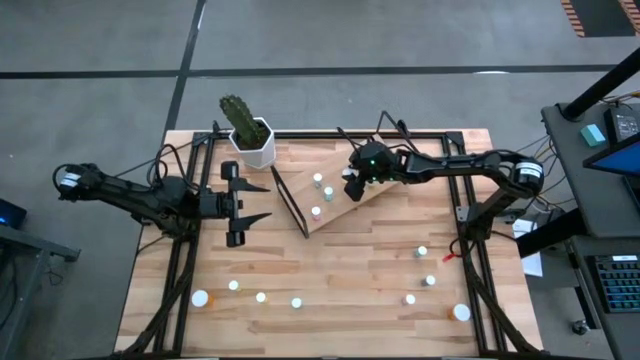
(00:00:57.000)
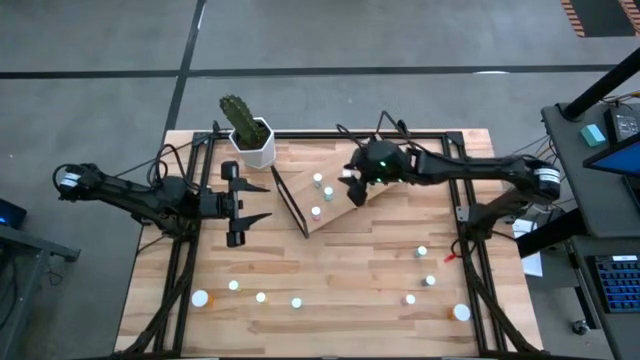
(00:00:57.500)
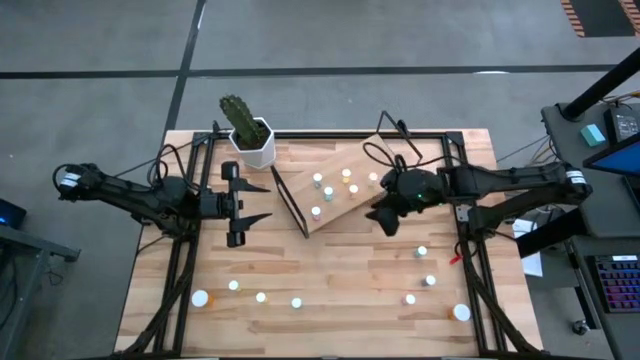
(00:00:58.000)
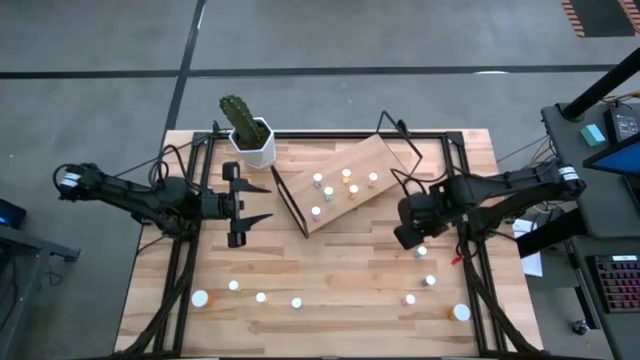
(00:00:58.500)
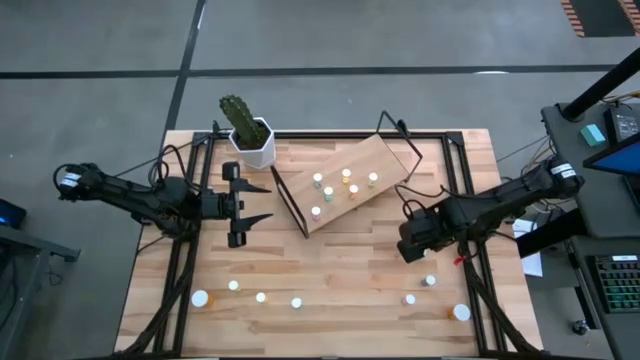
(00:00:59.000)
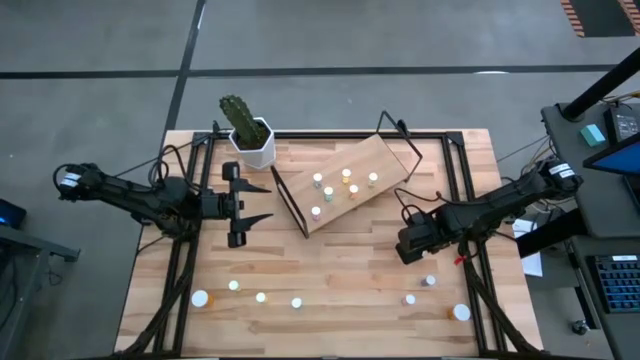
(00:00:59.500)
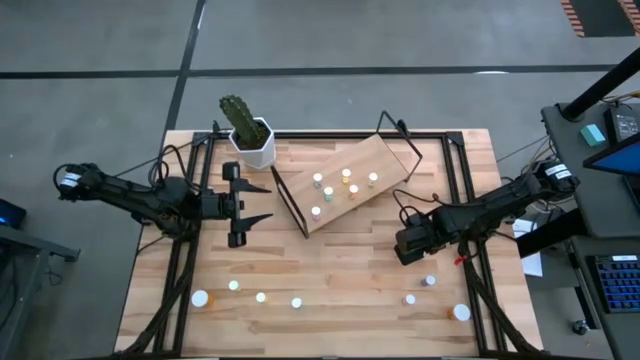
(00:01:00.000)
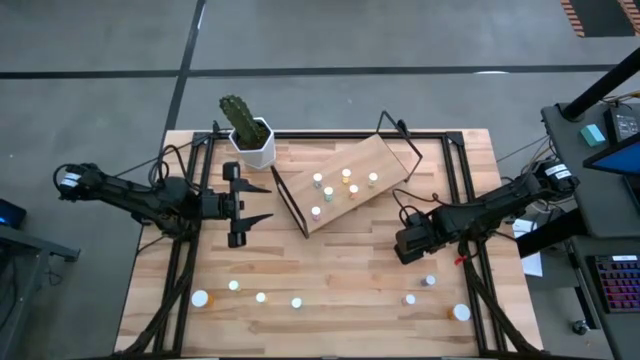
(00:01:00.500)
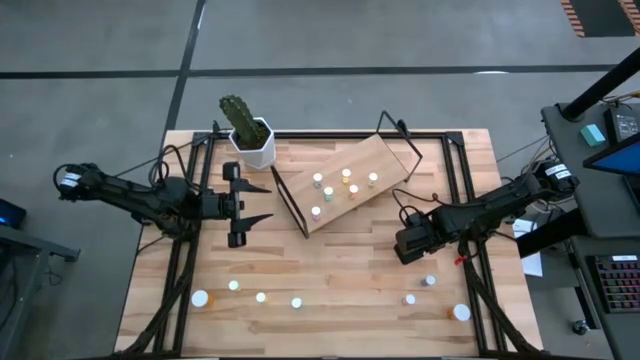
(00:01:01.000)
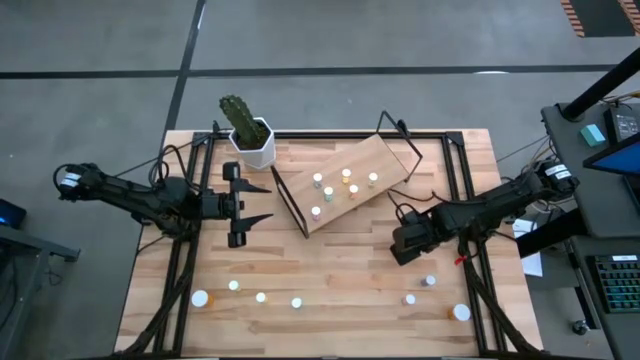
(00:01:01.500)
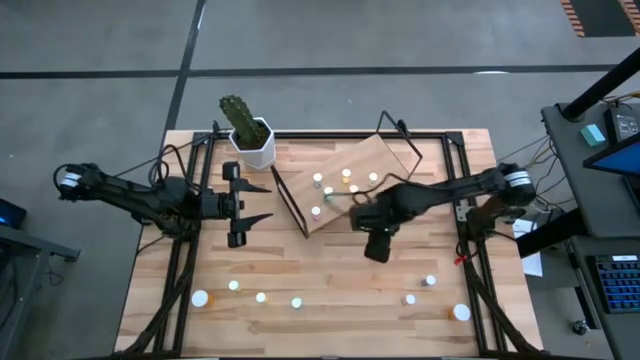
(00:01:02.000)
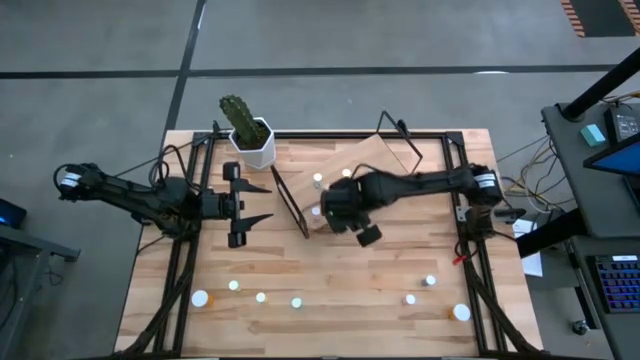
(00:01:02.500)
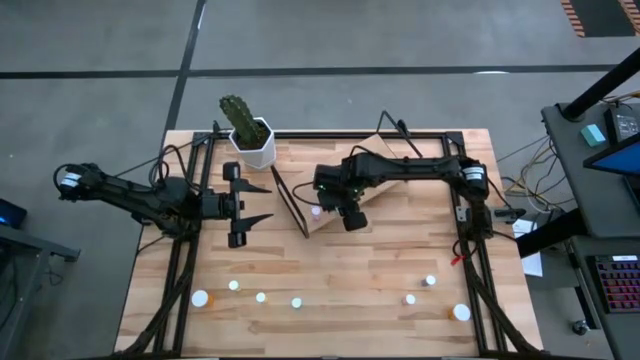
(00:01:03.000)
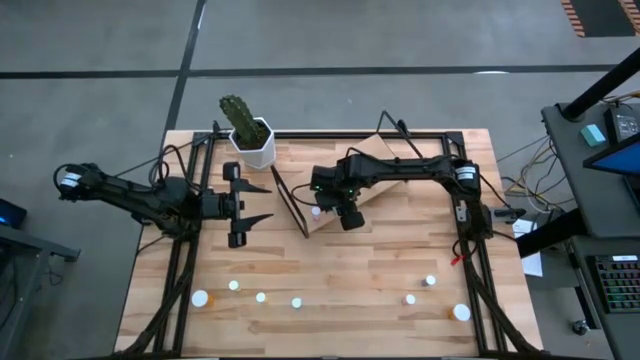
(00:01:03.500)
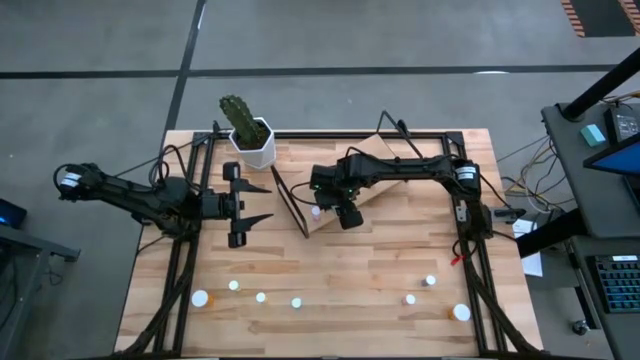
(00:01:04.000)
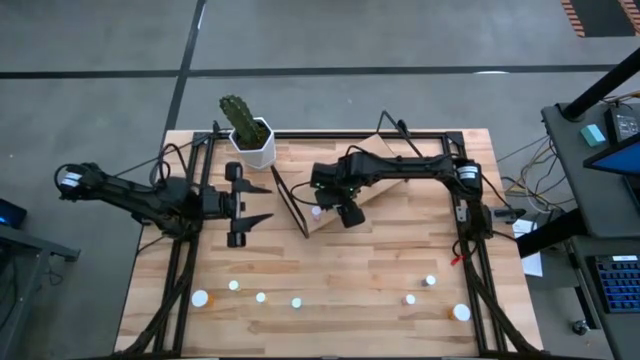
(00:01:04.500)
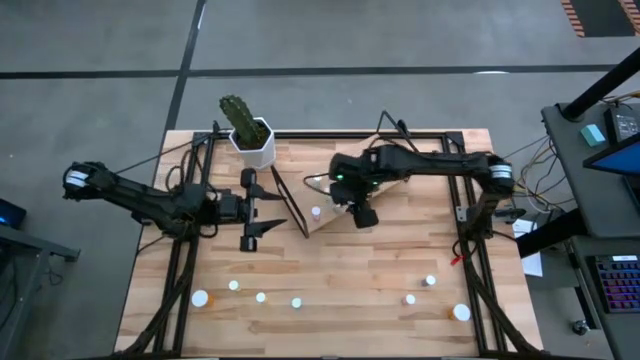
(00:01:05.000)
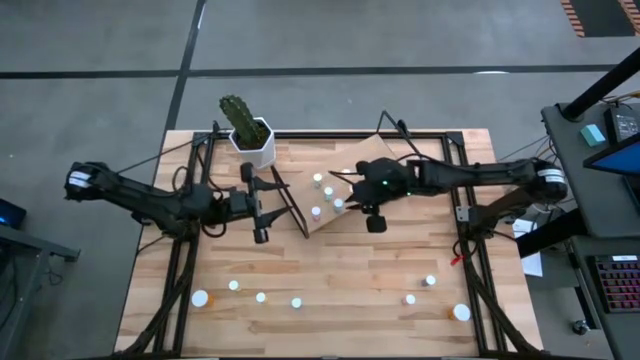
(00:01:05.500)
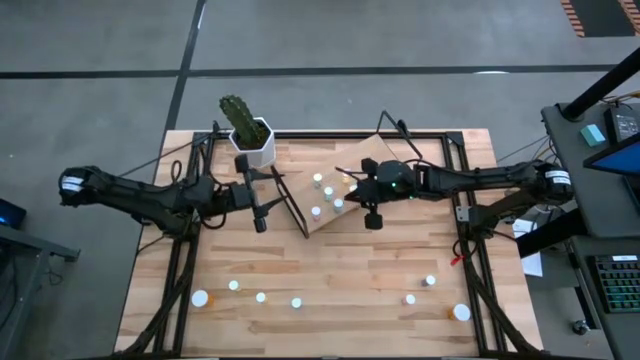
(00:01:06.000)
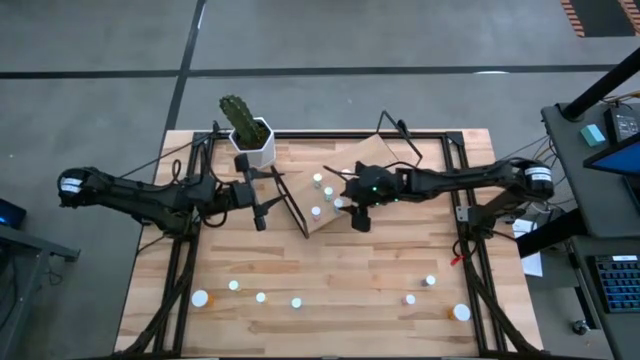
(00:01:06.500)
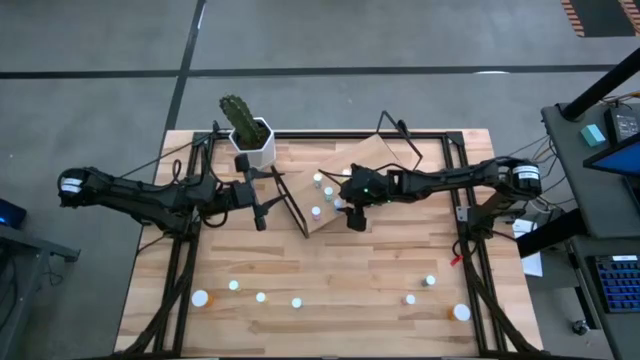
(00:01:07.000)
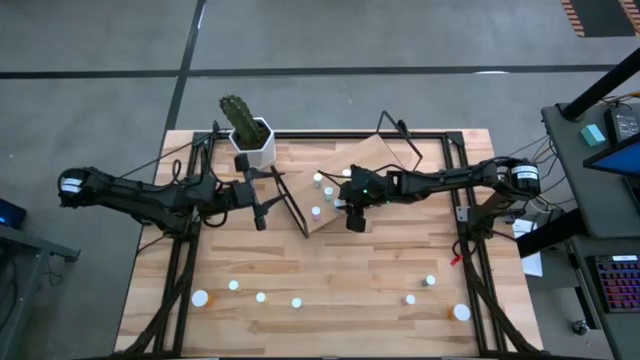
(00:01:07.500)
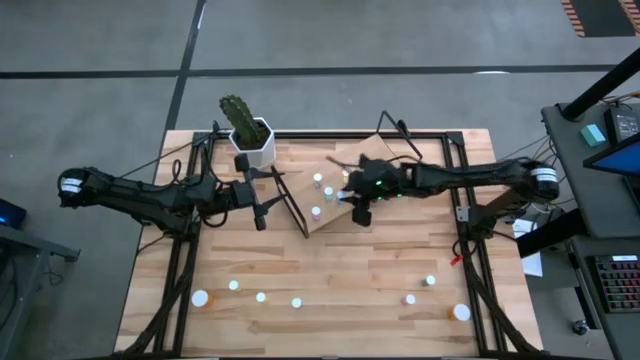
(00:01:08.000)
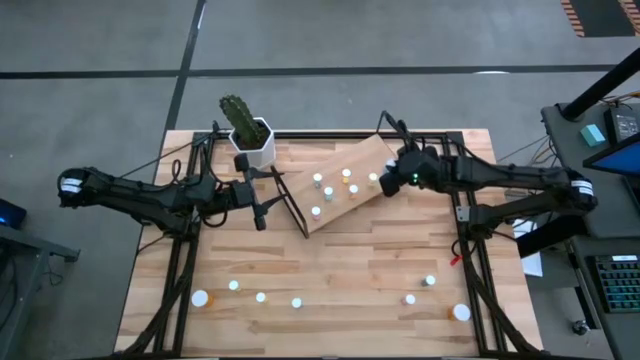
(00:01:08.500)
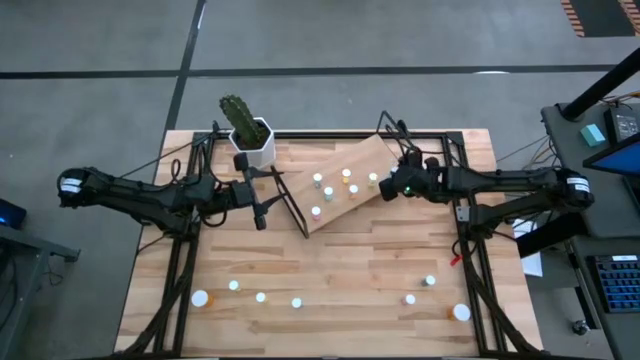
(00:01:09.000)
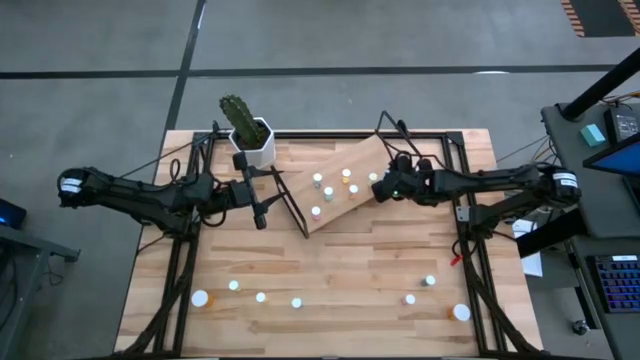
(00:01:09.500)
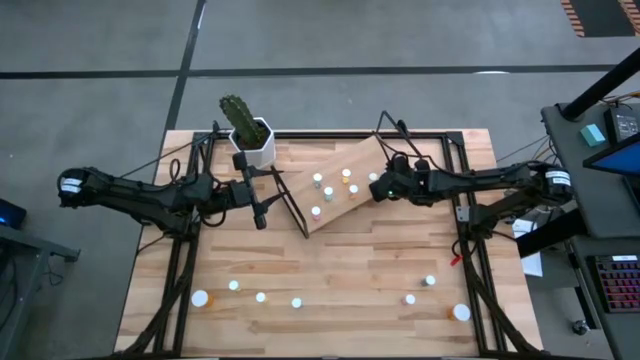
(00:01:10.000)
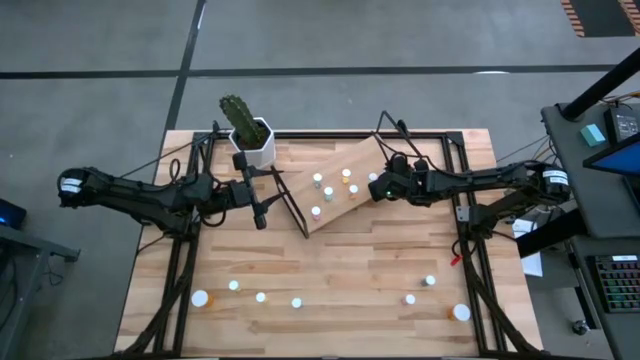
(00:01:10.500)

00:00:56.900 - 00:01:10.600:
Task: Pick and place medicine bottles onto shelf by color
Put the blue pill bottle on the shelf

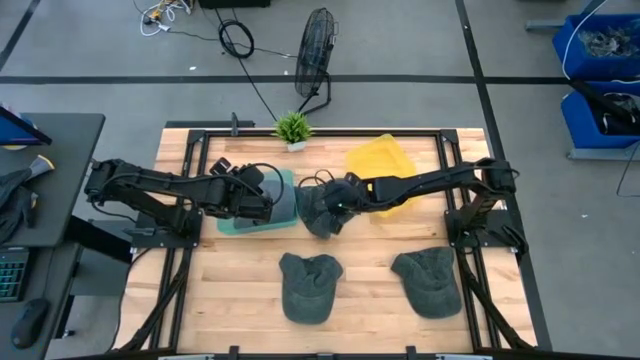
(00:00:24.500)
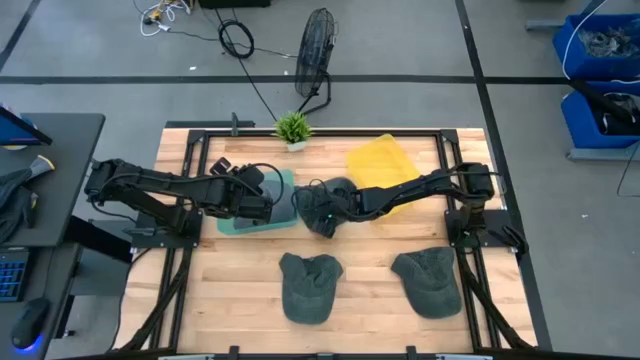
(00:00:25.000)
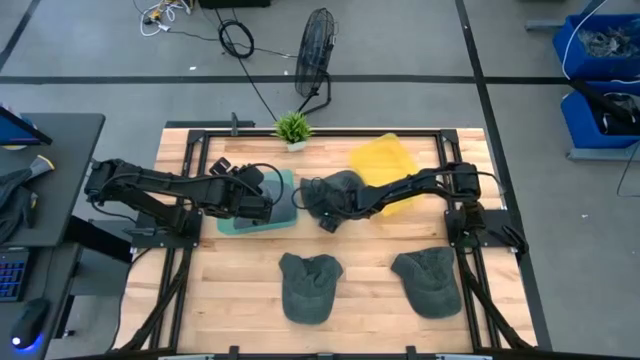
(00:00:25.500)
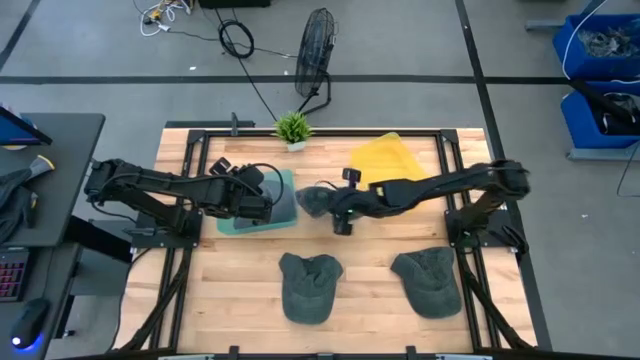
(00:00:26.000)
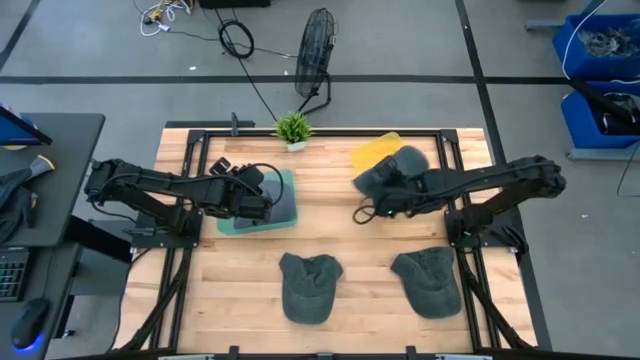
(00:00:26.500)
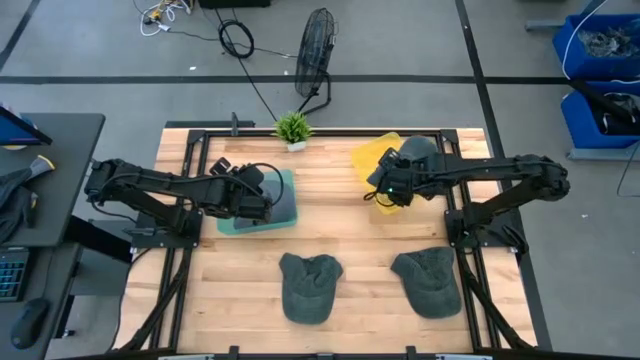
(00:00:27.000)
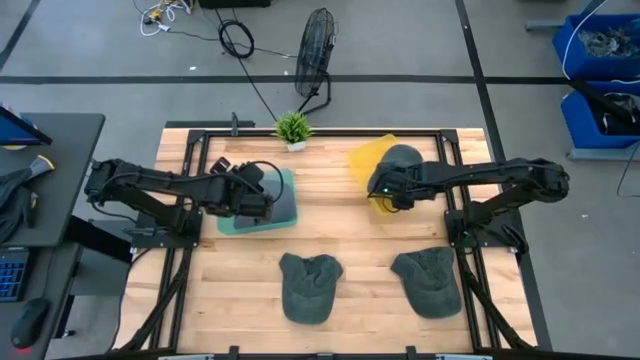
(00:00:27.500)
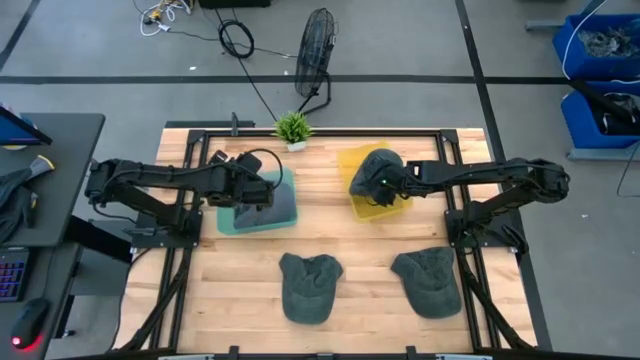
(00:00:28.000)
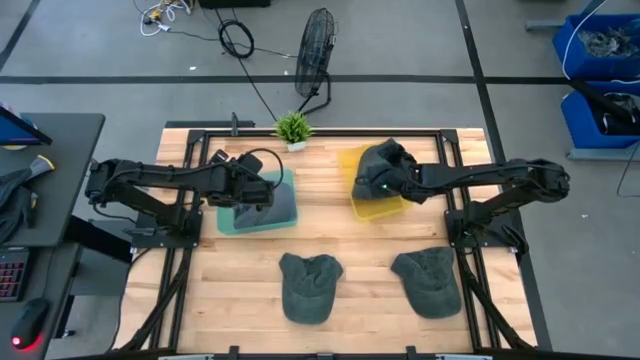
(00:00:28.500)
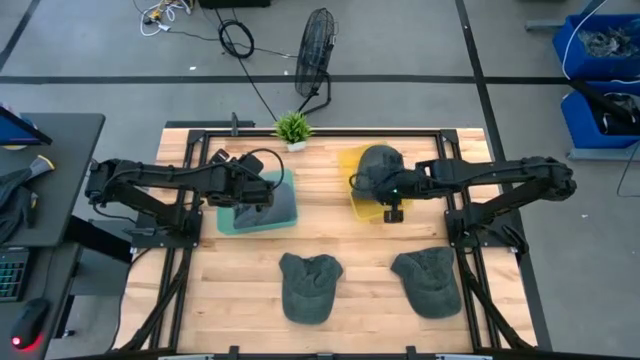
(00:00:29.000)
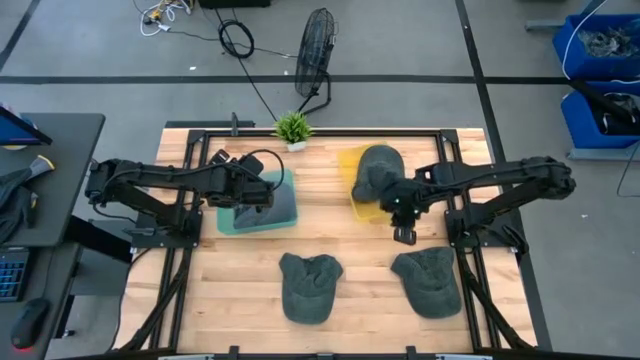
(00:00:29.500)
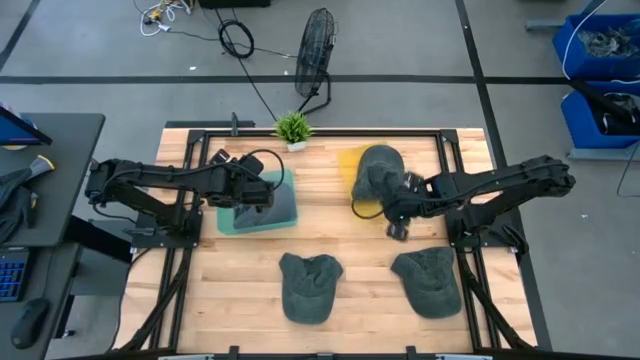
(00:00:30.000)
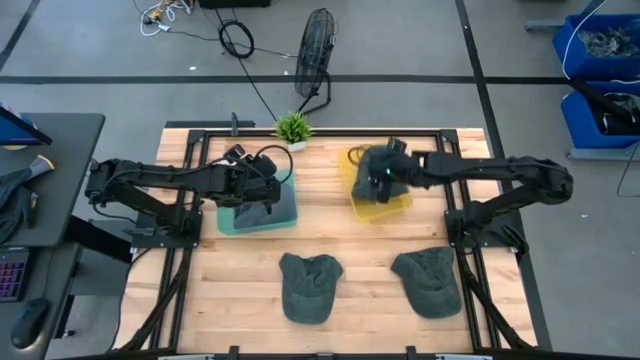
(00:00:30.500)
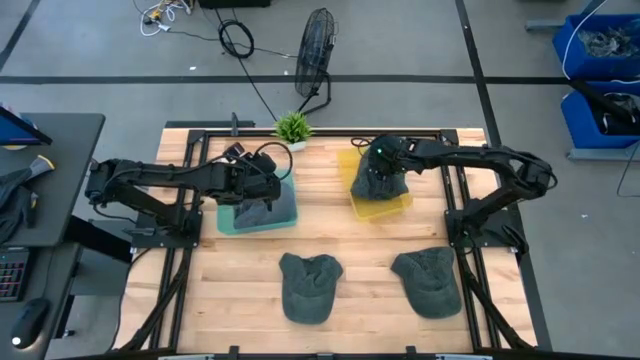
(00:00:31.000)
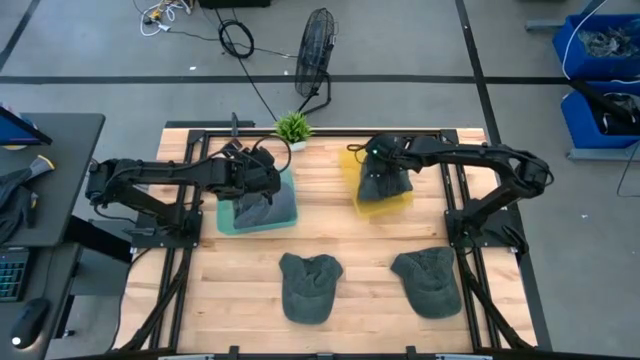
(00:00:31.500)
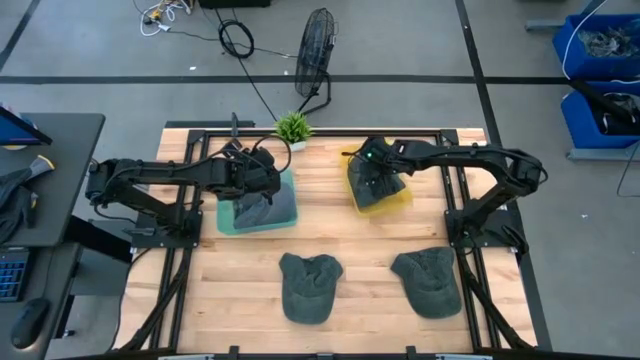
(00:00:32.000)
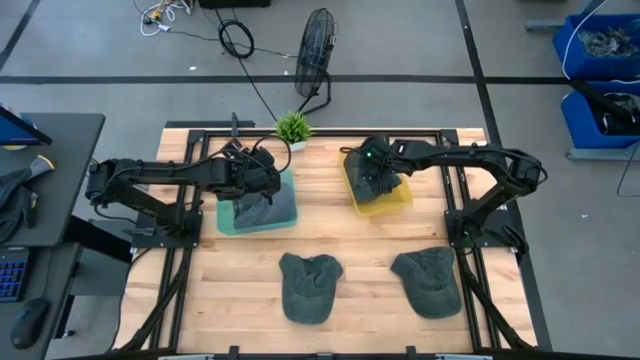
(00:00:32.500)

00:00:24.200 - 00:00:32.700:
Task: Pick & Place hat
Put the top black cap into the yellow bin
